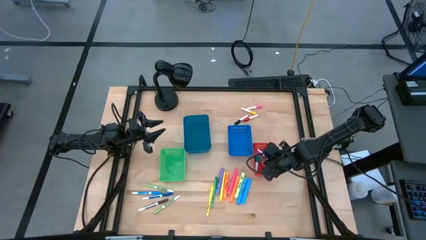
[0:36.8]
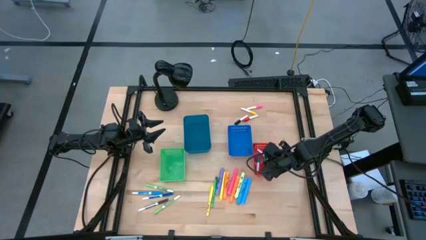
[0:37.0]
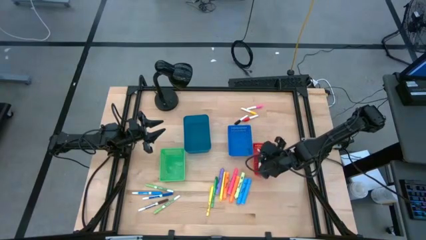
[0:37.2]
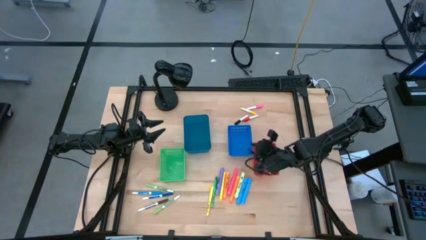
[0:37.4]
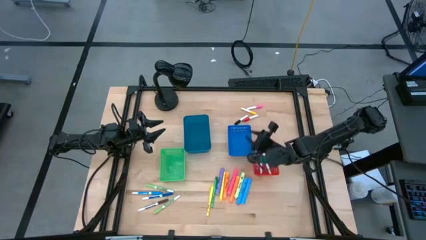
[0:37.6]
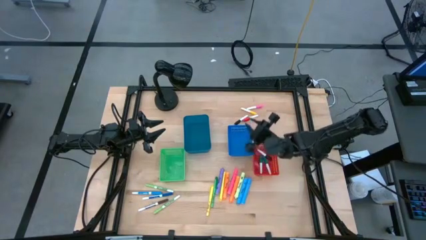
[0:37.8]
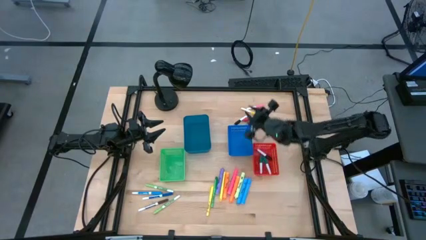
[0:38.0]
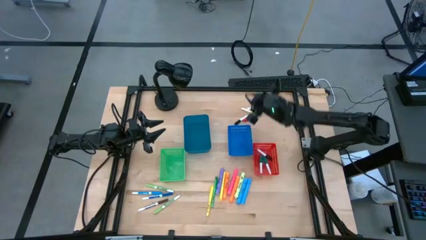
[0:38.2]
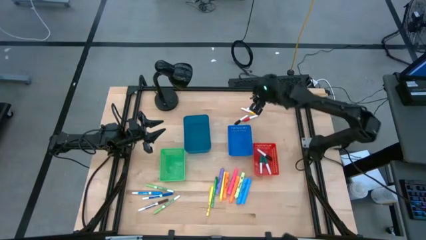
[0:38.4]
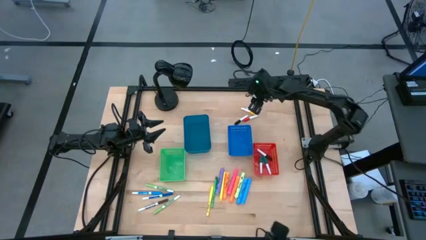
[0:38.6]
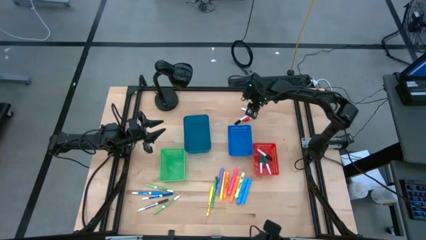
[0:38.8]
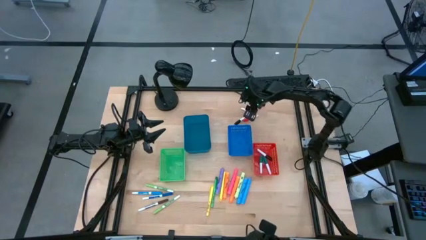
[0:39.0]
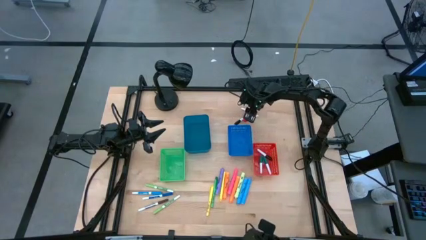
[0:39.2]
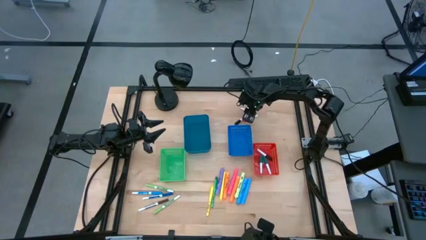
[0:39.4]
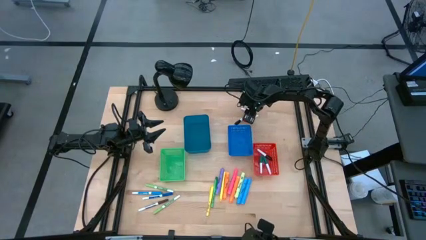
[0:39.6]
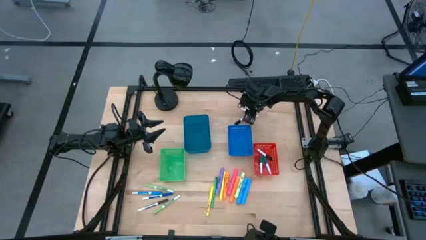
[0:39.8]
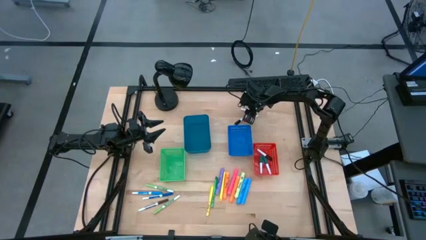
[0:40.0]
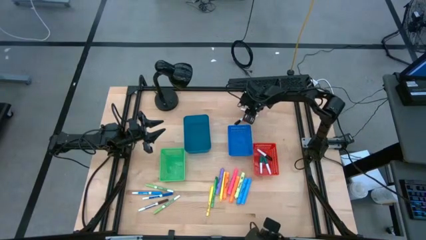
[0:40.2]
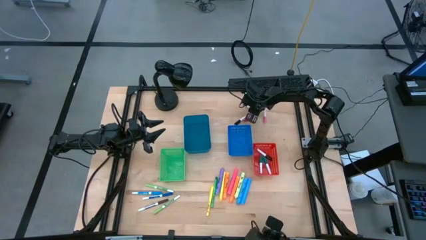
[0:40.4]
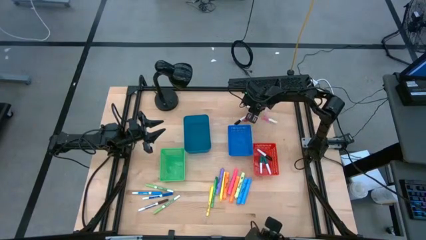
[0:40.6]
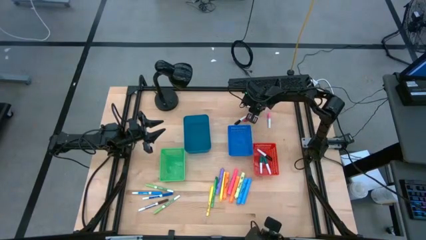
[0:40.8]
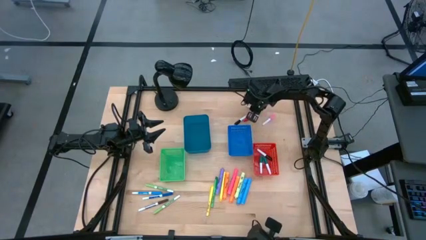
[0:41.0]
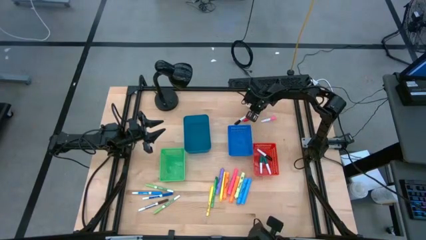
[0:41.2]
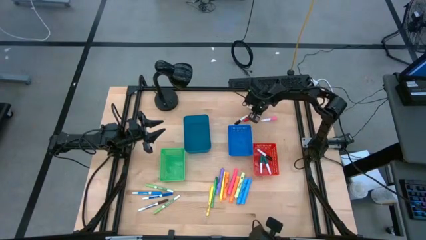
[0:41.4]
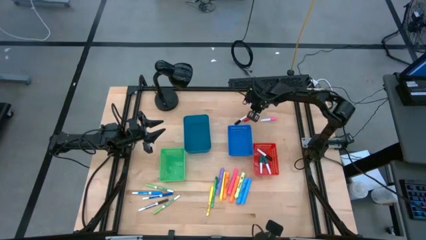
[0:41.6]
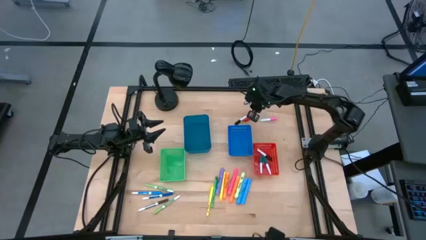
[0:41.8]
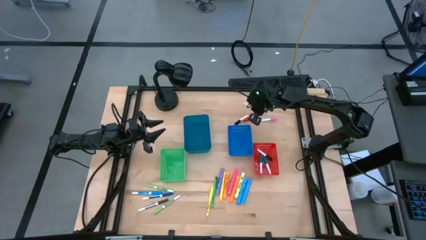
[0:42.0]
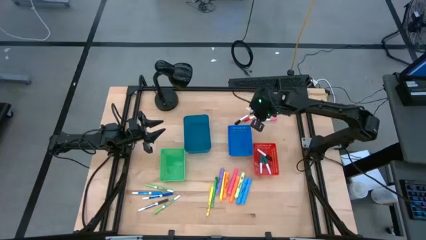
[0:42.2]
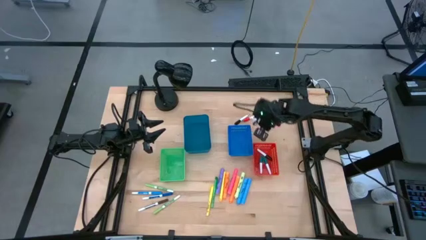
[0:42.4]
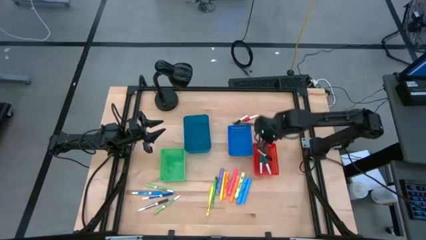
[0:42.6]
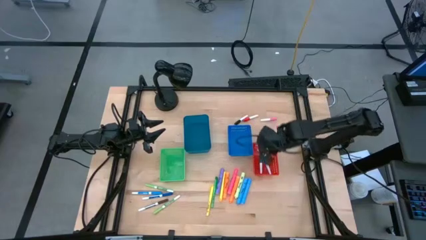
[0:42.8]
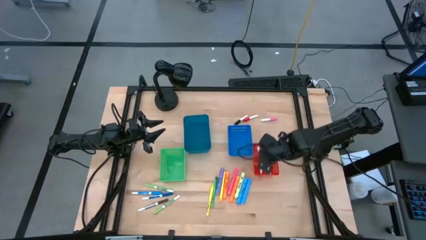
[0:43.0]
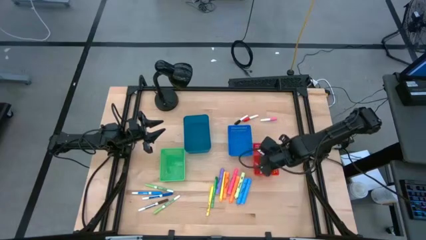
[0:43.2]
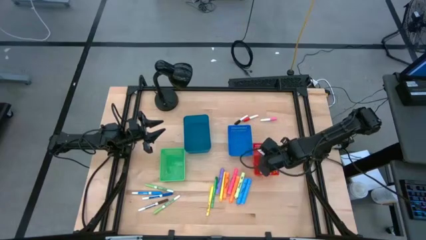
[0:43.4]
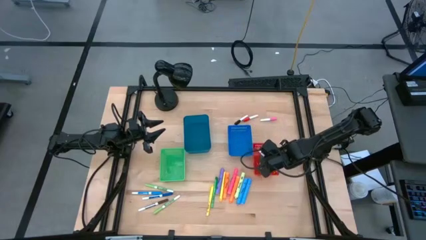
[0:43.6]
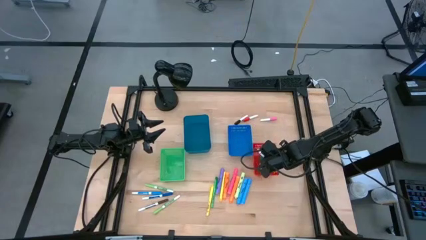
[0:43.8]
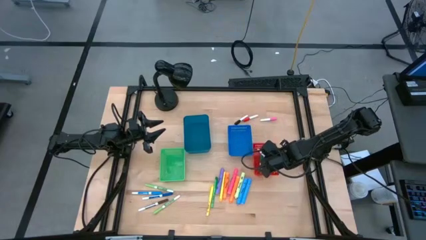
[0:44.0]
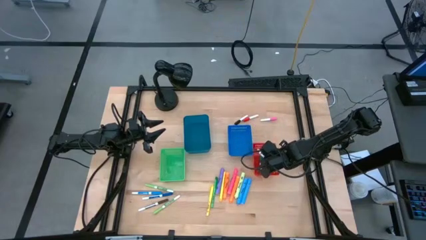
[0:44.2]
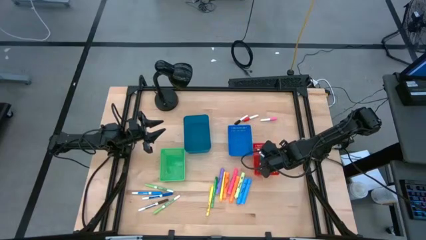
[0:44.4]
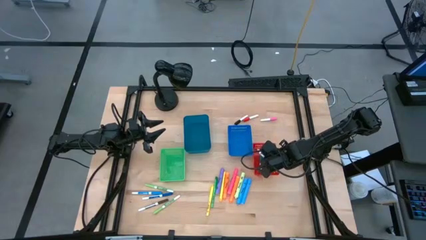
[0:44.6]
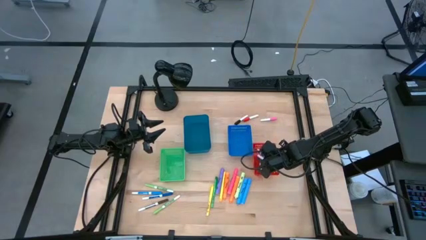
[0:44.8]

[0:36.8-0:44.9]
Task: Pick & Place Markers
Put the yellow highlighter pen into the red bin

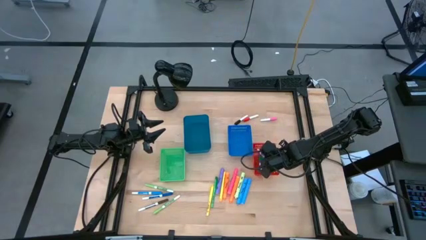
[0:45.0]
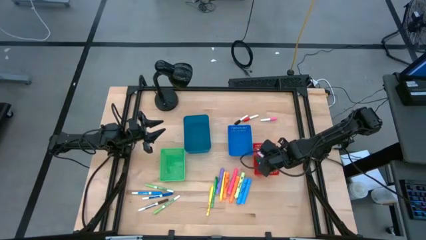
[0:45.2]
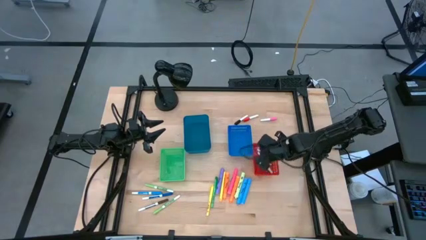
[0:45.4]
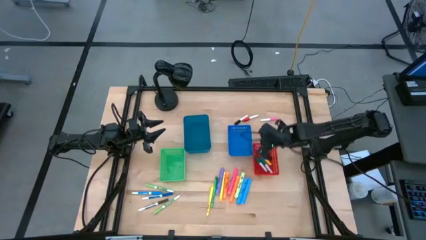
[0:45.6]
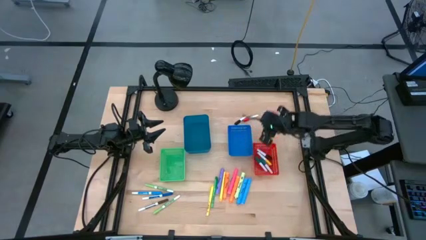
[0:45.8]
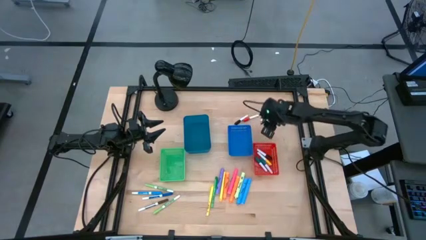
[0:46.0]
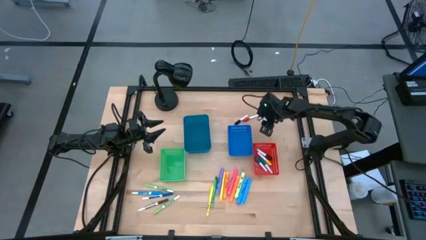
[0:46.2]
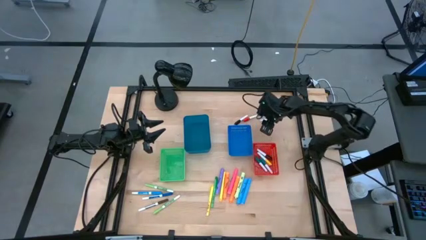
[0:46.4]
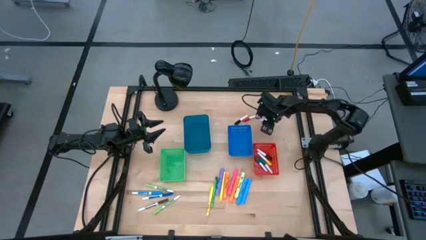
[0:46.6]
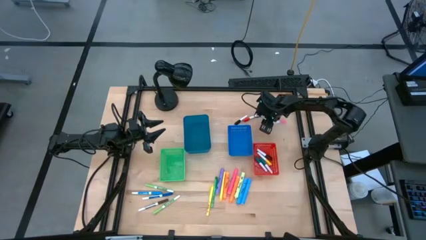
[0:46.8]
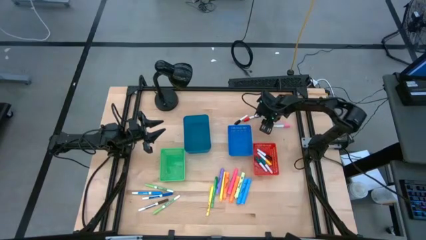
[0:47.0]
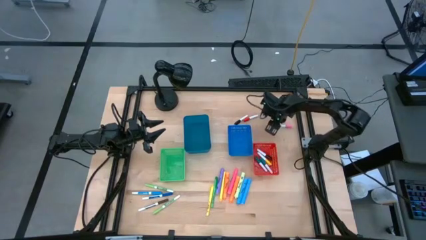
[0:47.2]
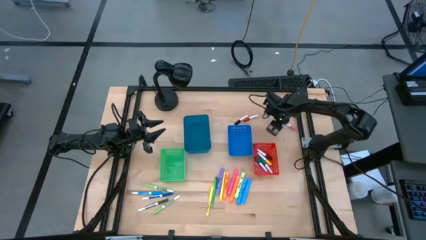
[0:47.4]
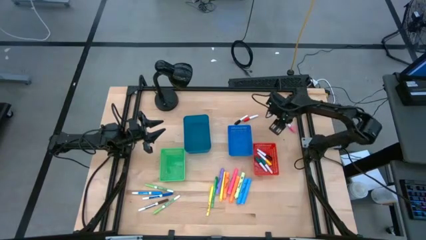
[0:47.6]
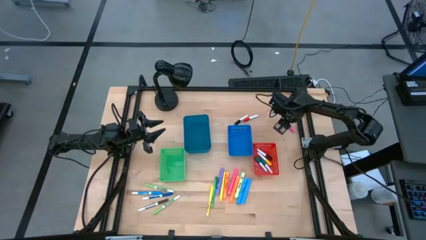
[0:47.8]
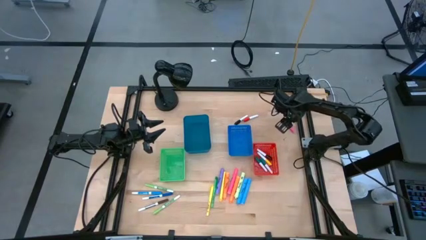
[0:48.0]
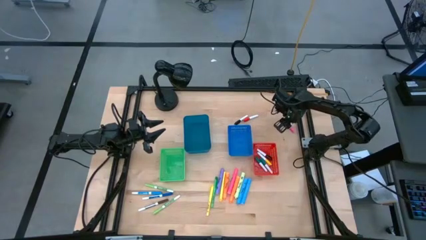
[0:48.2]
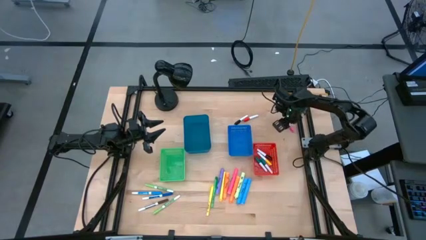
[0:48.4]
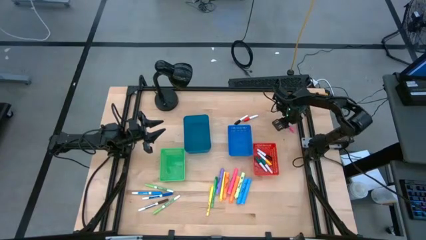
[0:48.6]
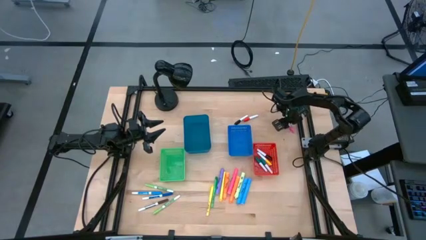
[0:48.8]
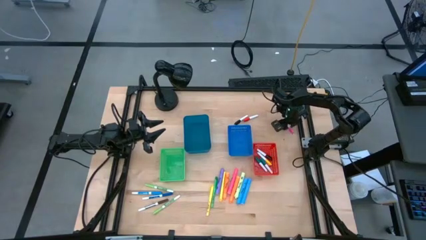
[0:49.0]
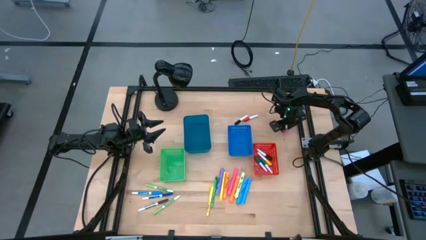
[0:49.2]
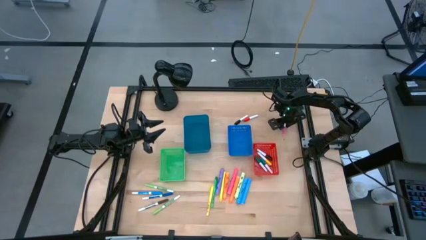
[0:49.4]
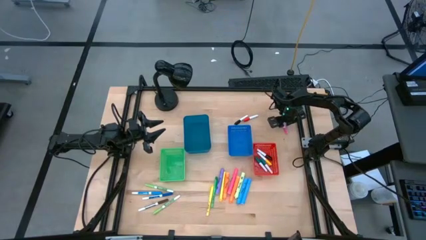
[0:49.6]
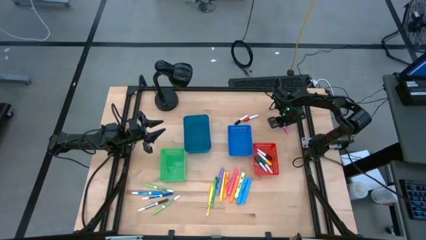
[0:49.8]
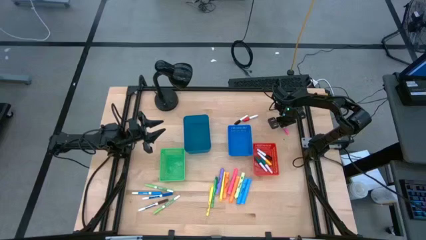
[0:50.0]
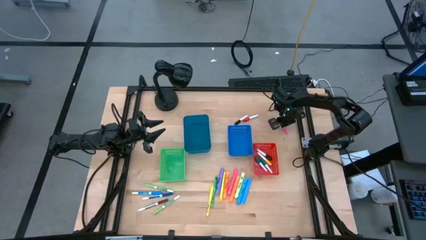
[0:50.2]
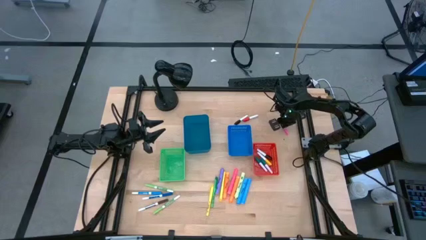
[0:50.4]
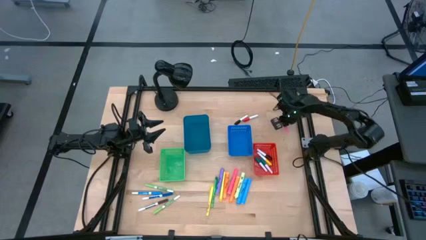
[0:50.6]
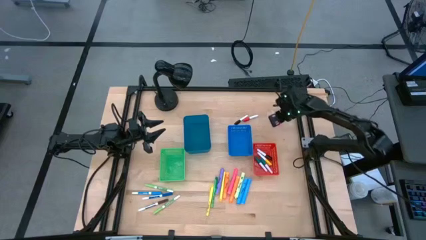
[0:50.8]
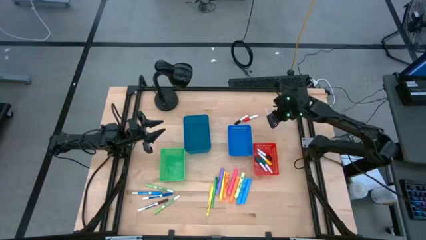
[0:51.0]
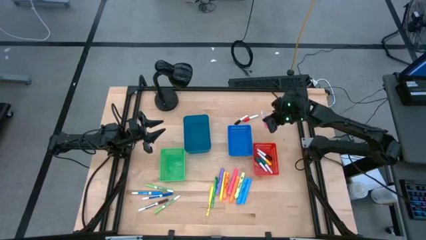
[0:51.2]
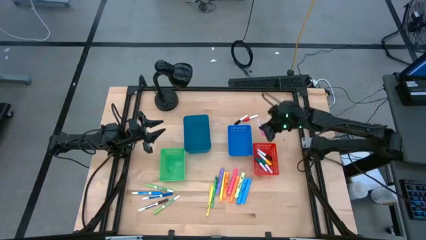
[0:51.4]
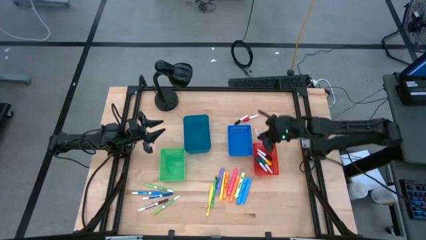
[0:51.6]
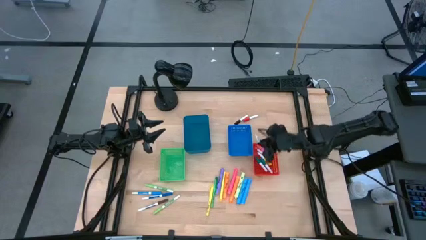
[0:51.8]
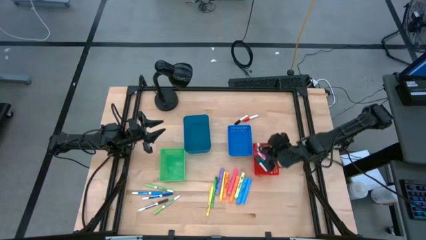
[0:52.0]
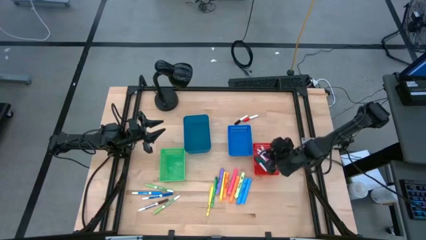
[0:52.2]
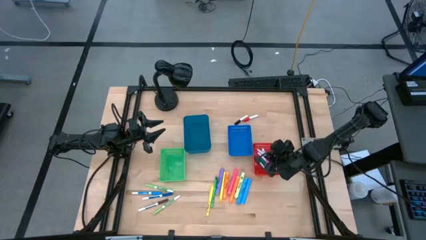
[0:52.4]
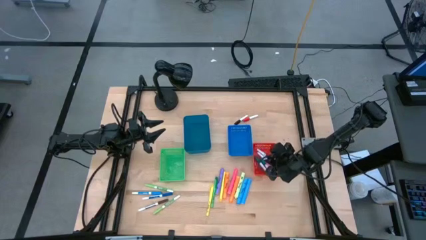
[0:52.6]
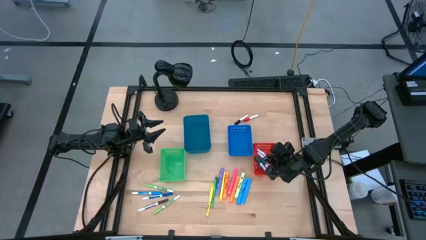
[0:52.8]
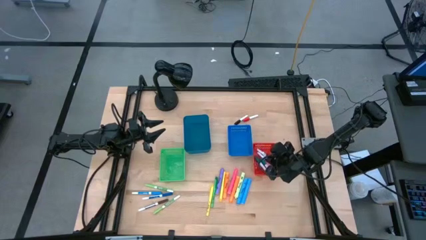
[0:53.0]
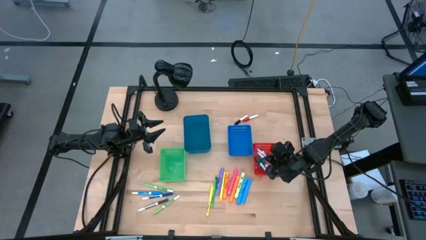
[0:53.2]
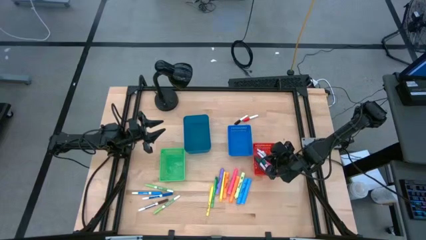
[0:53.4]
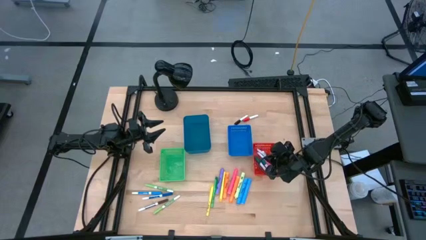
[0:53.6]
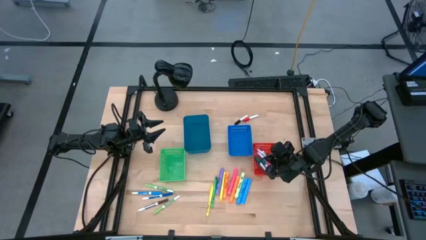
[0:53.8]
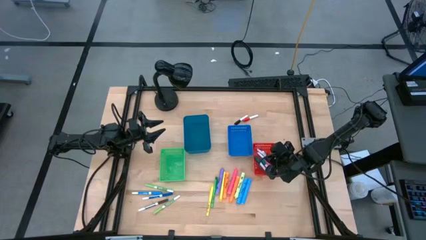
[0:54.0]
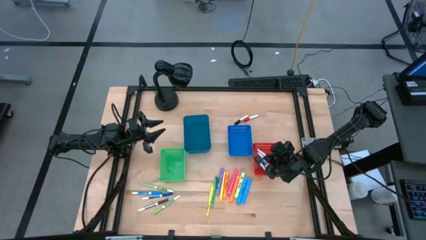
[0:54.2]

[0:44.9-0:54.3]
Put the pink highlighter pen into the red bin
